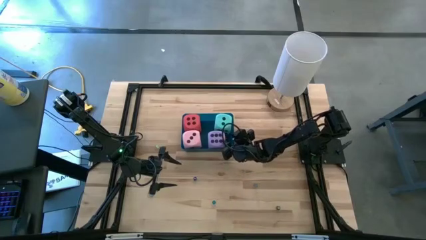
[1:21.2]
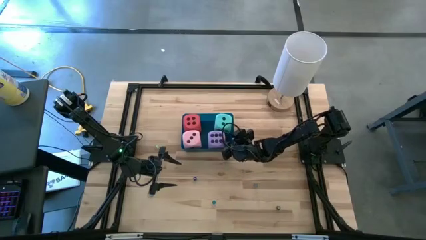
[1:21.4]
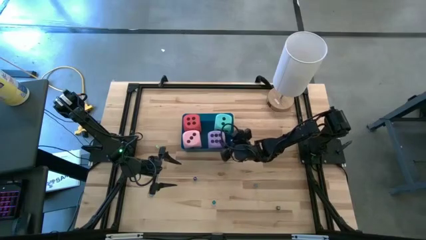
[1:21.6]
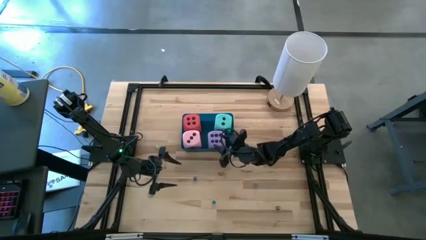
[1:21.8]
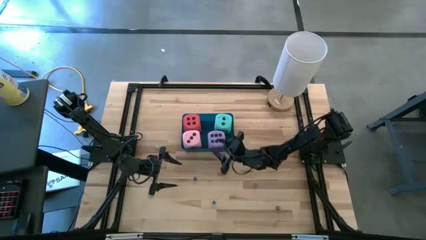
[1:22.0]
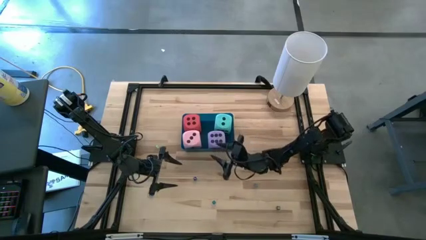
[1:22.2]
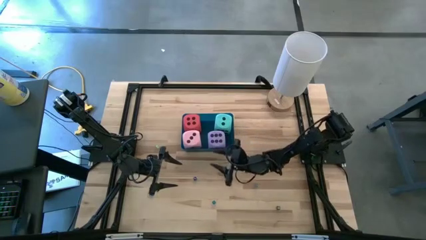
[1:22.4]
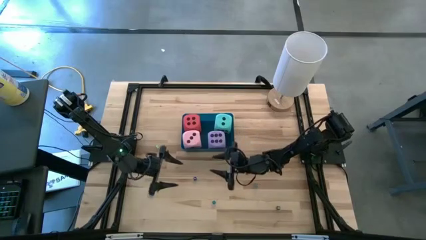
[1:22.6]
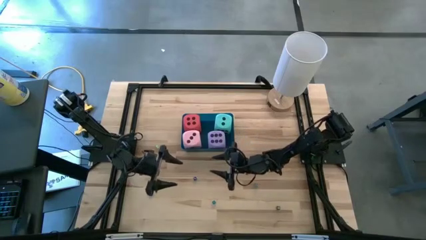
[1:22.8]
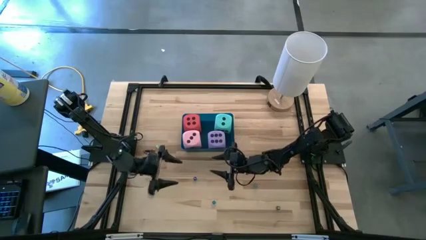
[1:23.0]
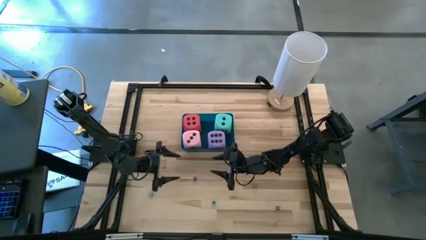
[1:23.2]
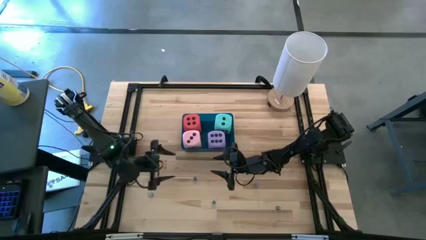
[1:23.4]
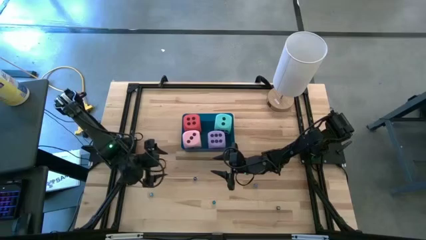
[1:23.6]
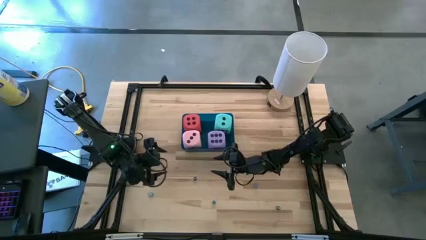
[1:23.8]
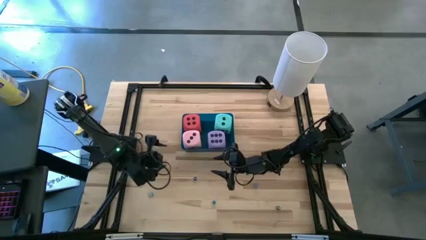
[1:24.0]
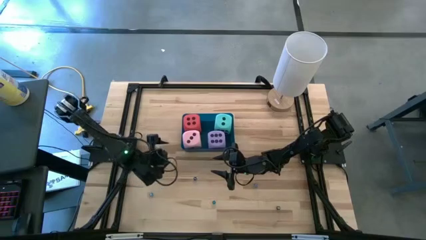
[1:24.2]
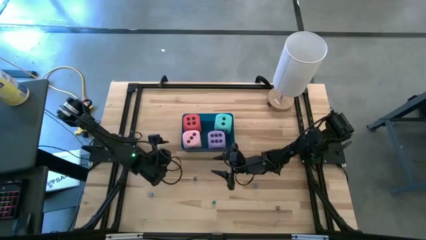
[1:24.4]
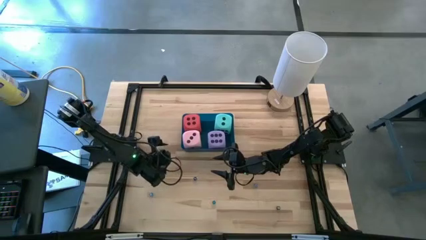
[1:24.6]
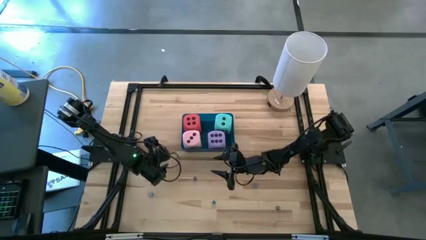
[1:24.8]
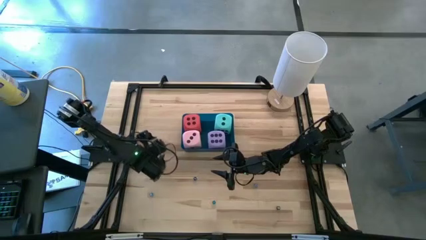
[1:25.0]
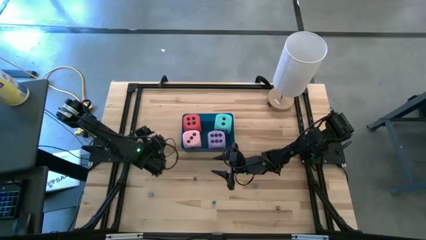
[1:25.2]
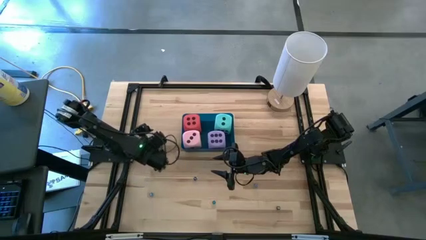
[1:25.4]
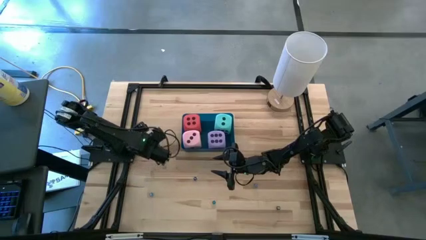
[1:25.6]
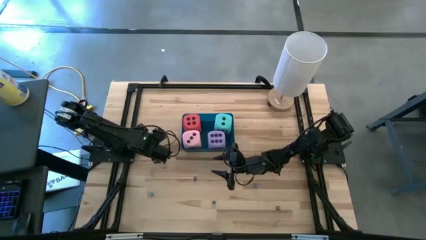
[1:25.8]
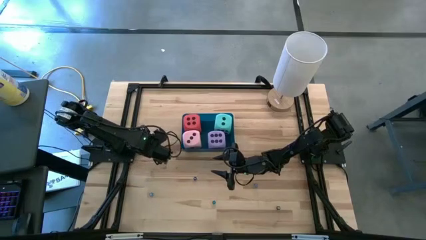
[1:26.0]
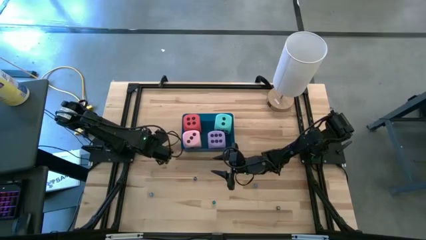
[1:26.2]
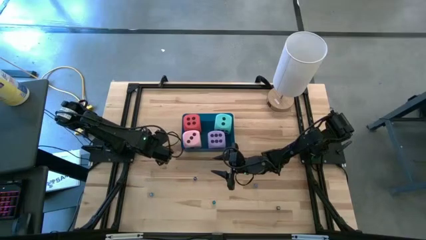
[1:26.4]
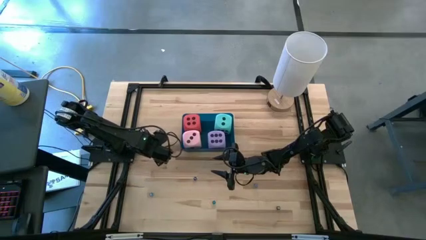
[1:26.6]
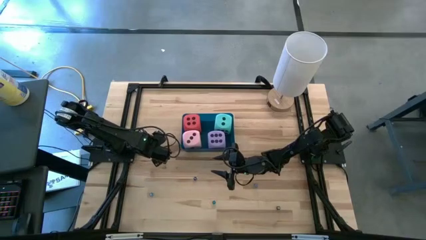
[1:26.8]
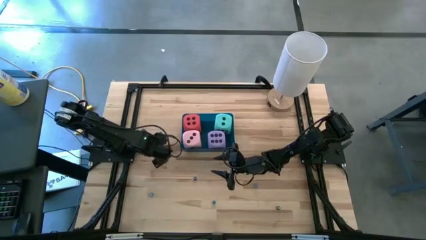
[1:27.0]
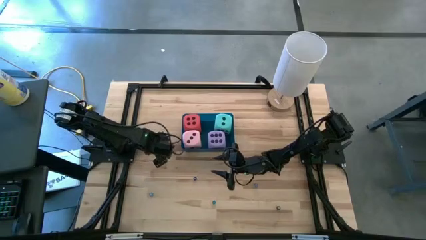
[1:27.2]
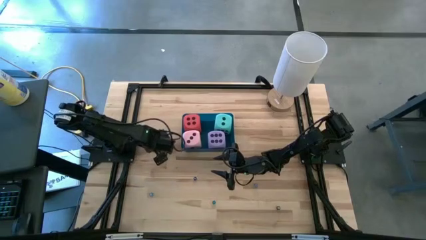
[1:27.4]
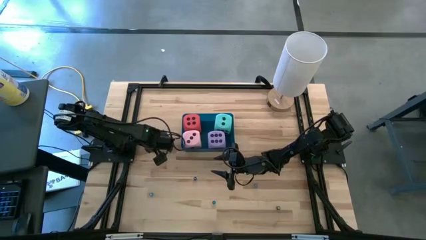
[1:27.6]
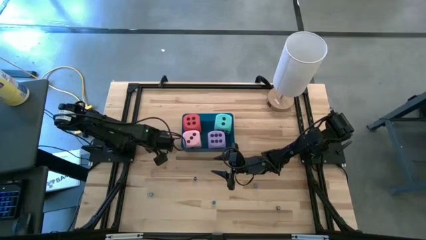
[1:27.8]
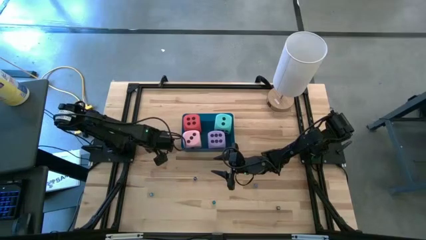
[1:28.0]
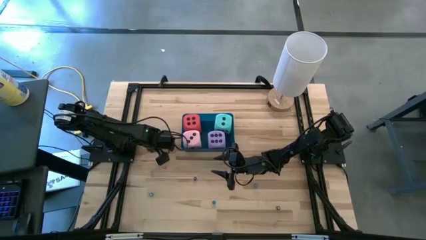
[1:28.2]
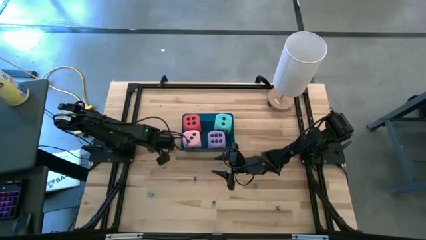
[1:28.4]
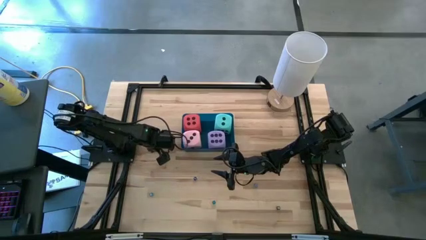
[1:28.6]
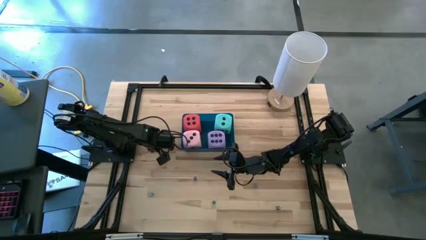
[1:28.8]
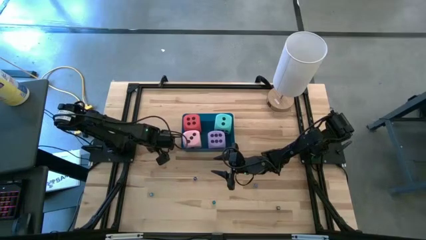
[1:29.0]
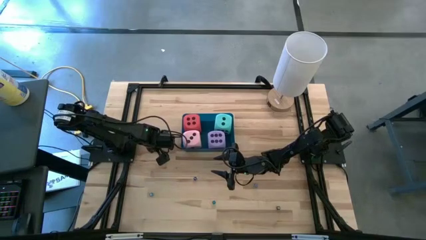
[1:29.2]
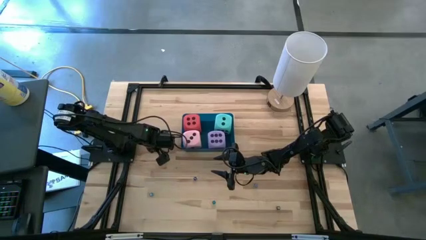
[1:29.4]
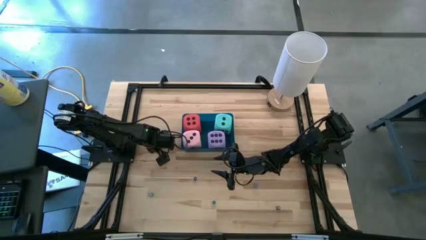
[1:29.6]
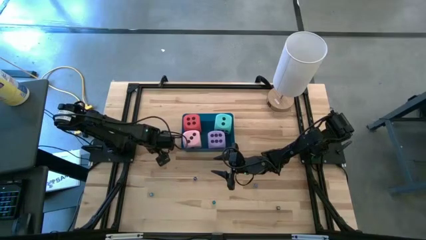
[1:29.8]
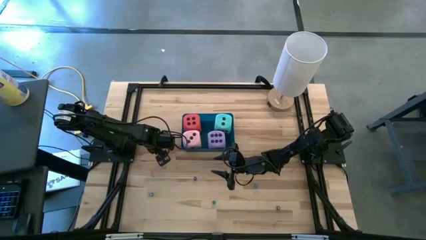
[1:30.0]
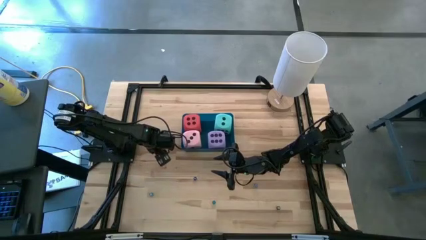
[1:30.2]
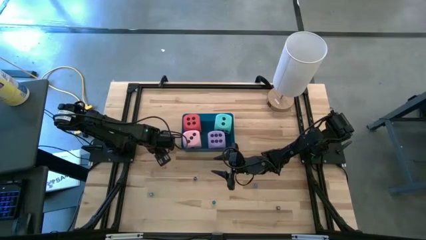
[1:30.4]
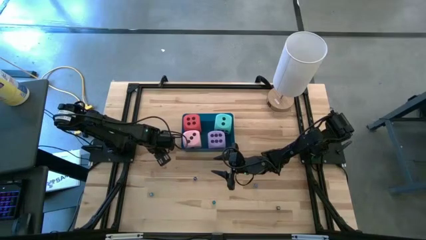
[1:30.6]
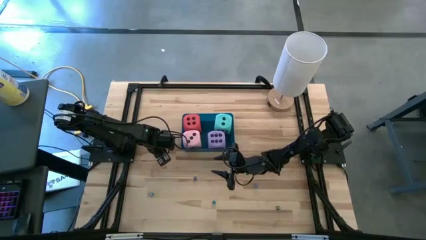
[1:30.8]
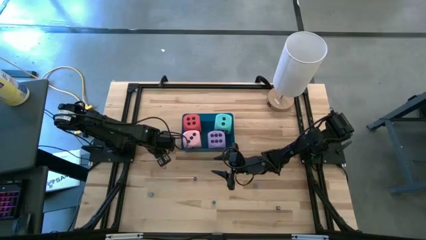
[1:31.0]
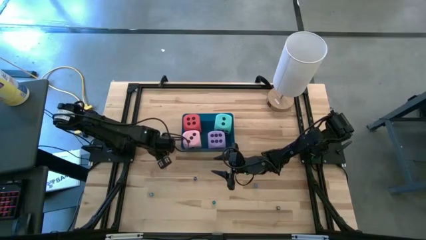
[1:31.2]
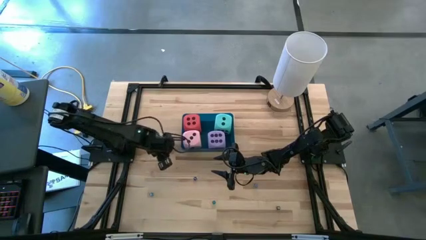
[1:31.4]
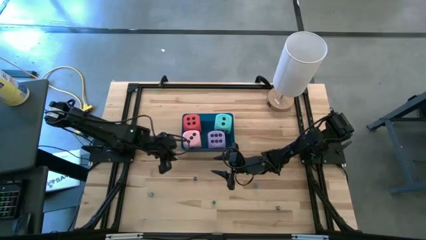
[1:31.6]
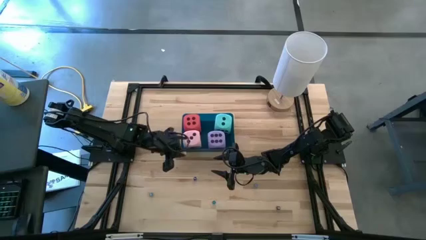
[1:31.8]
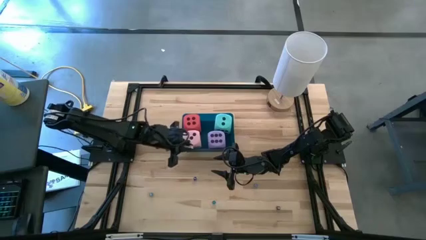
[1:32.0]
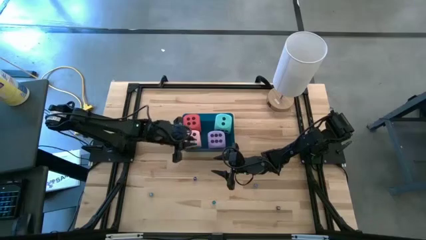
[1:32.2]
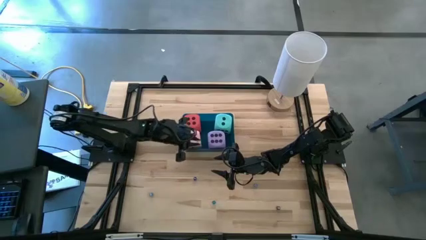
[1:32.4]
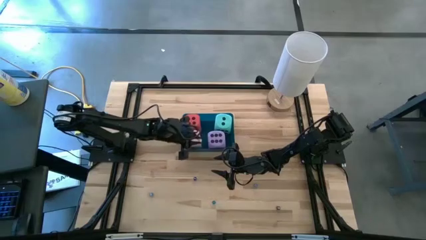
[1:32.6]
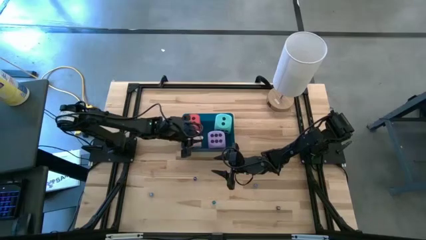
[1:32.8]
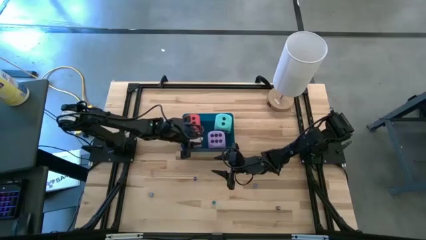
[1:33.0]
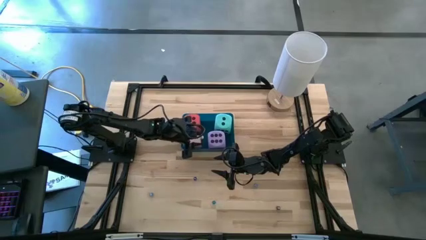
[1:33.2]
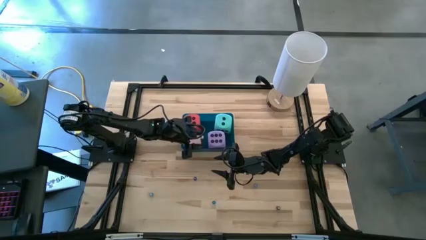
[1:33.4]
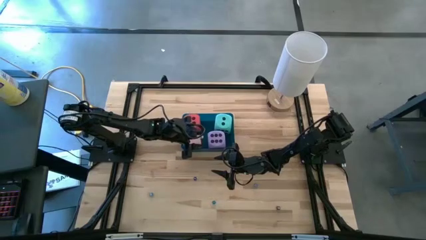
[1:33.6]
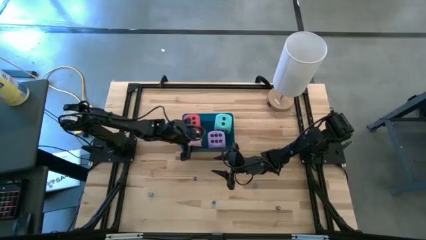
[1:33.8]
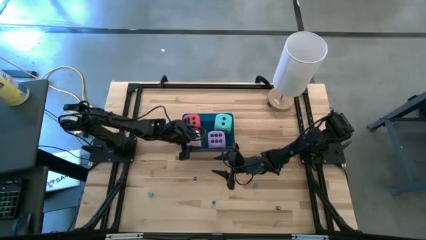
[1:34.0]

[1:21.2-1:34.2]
Task: Pick & Place Dice
Put the green die into the blue bin
